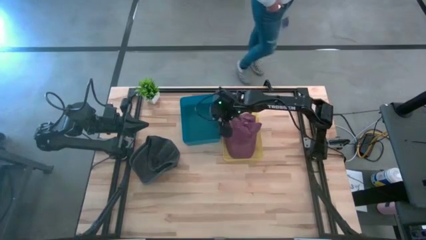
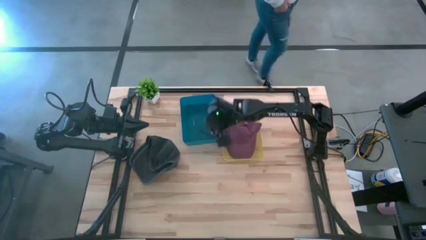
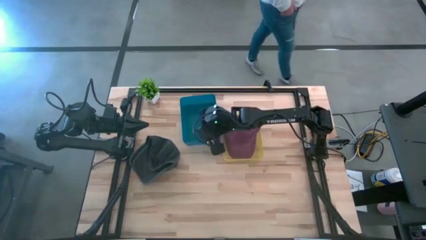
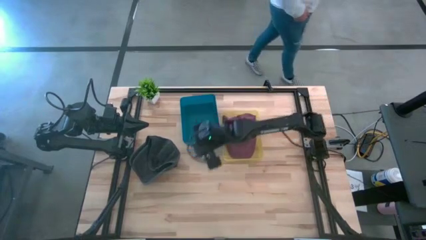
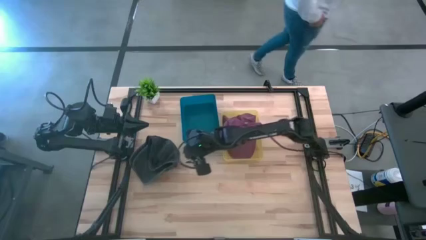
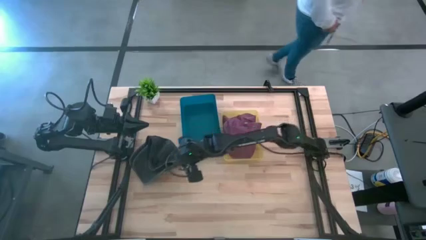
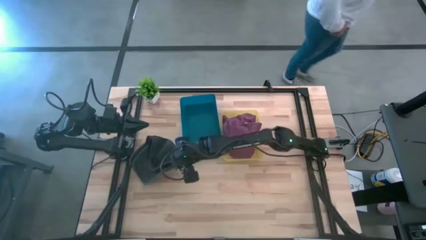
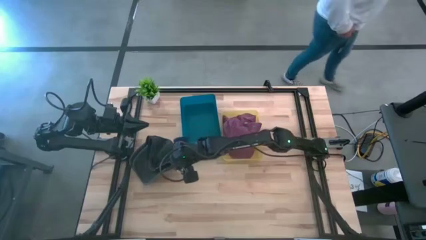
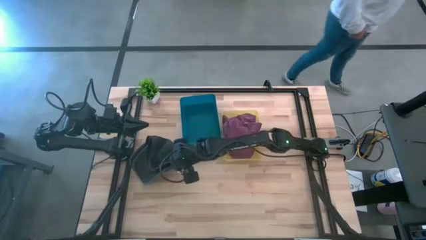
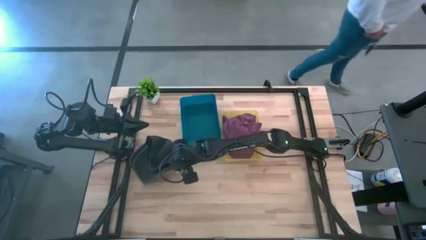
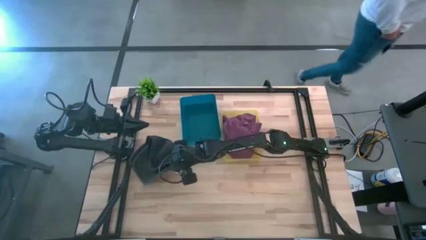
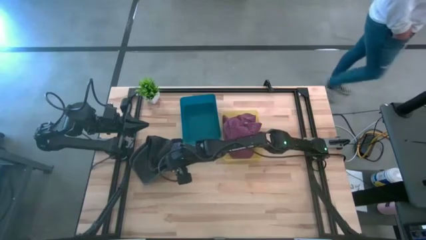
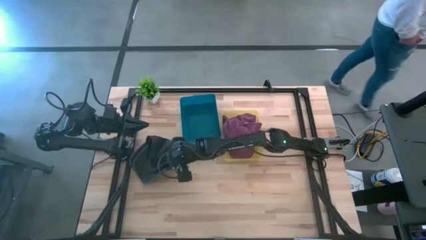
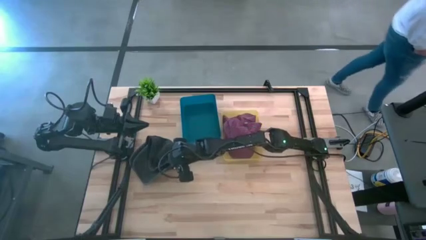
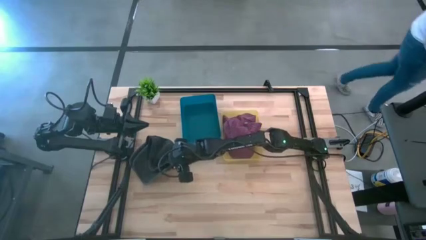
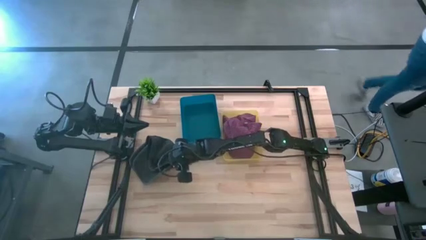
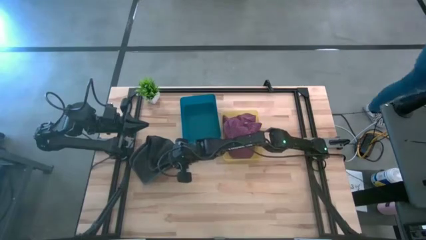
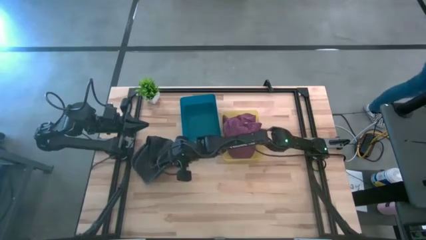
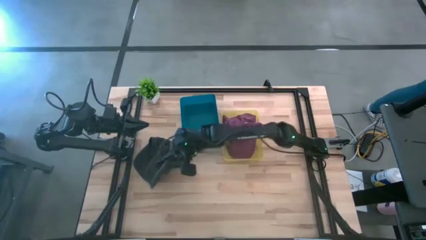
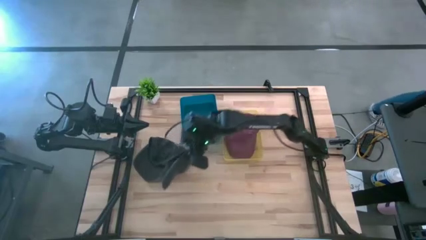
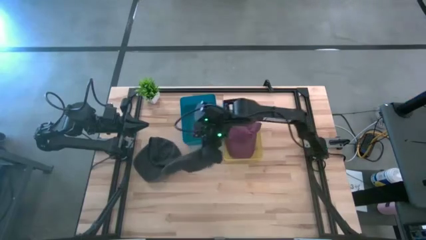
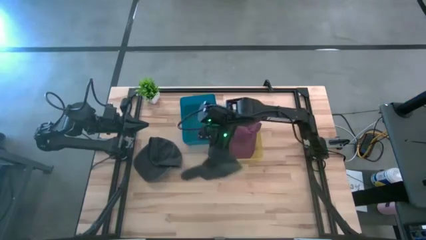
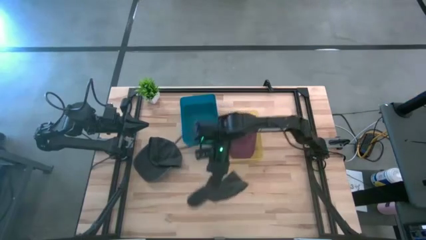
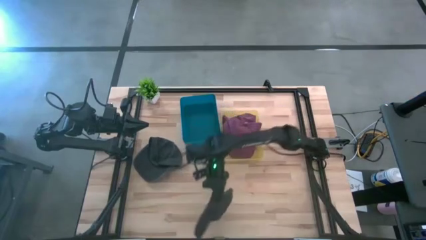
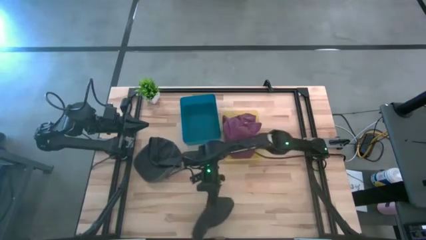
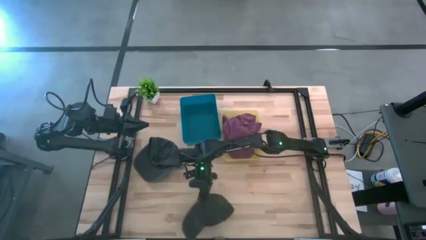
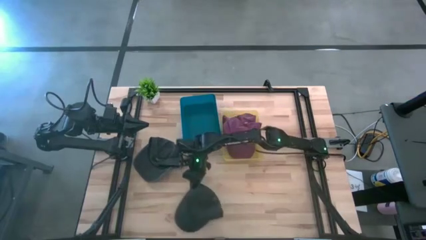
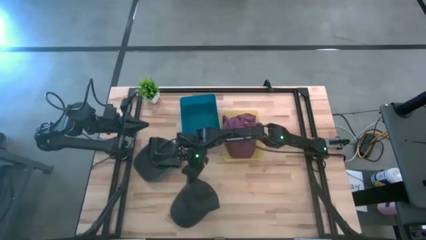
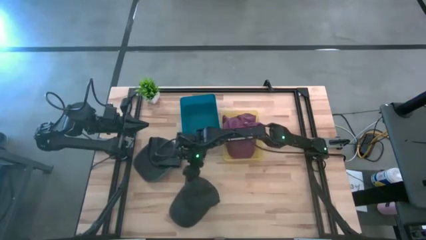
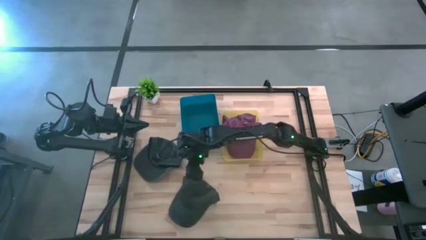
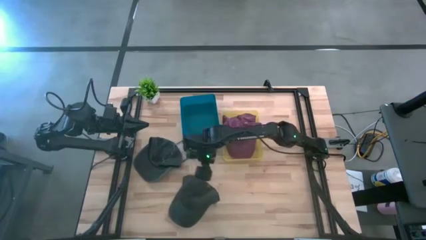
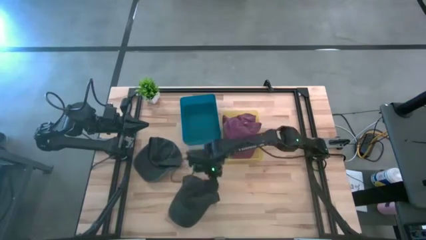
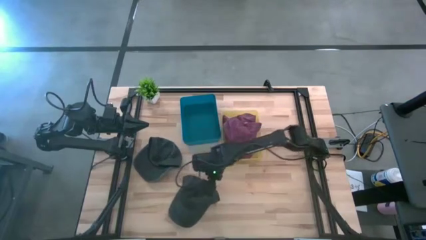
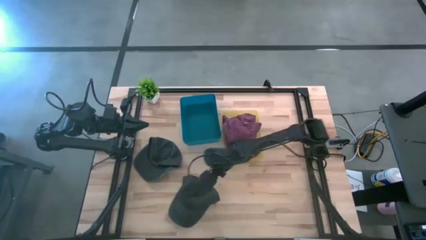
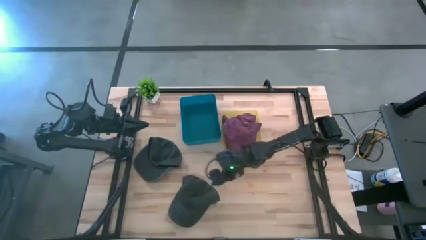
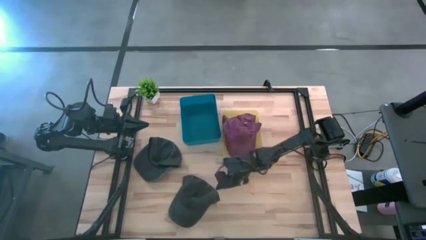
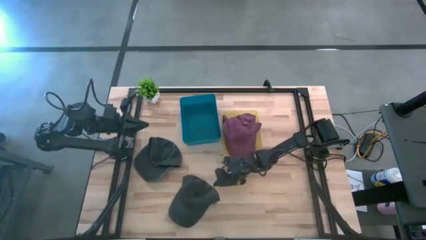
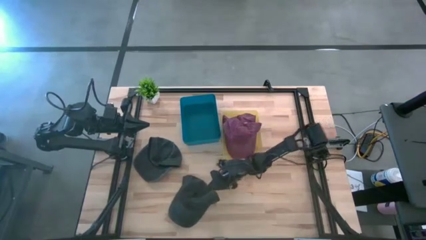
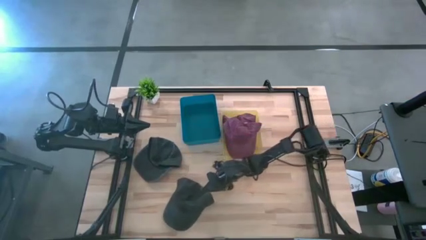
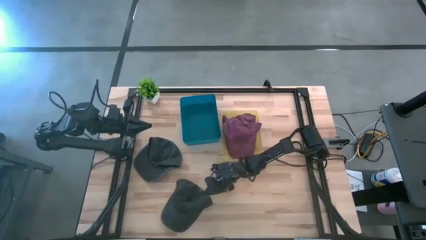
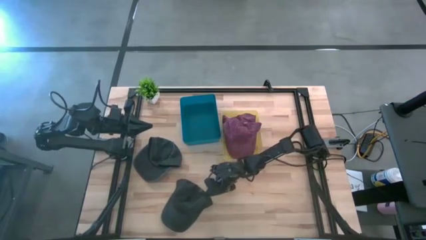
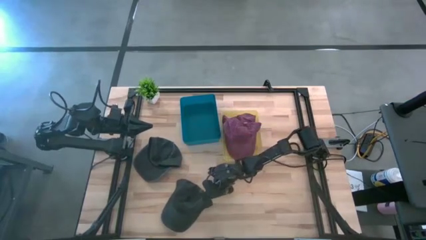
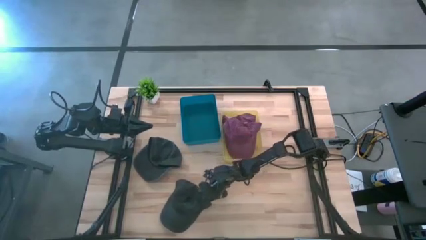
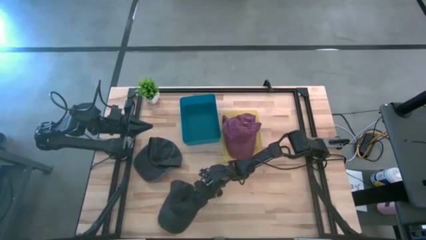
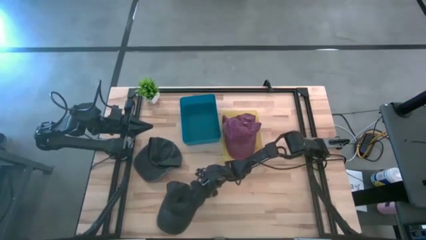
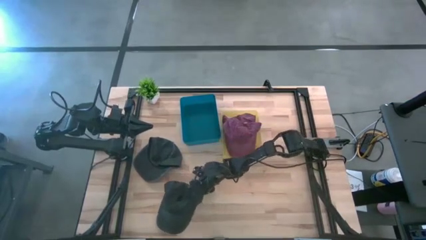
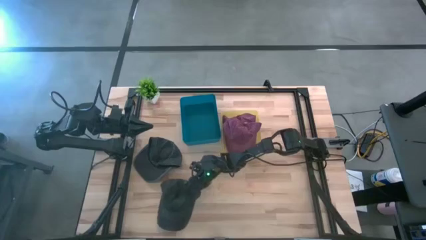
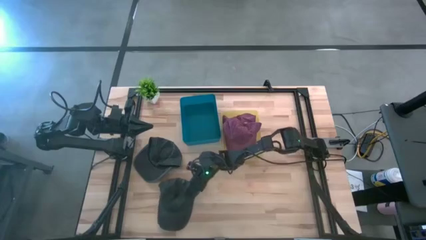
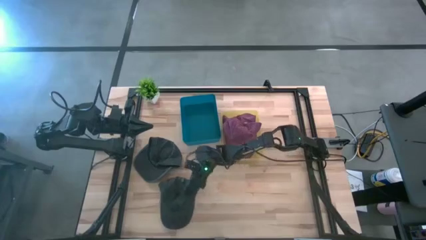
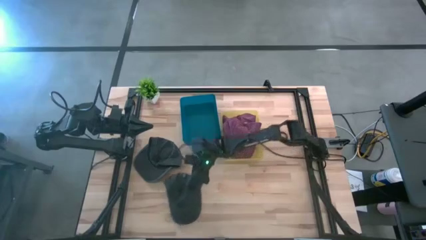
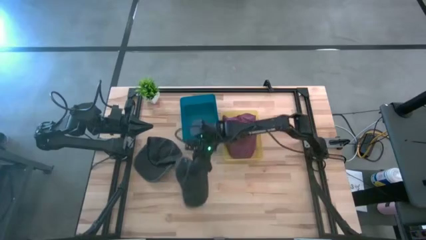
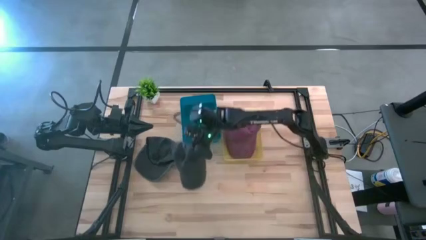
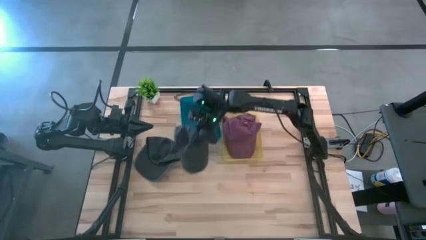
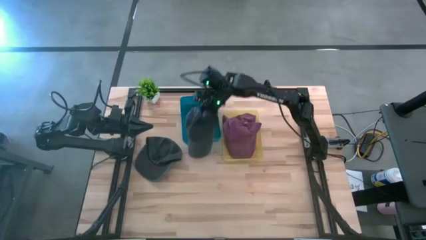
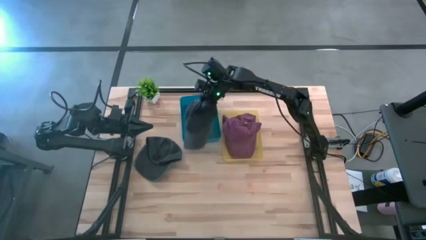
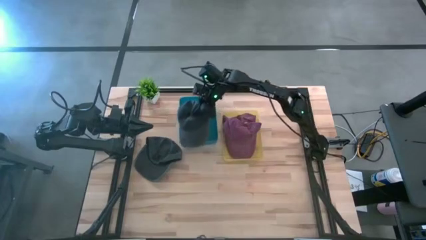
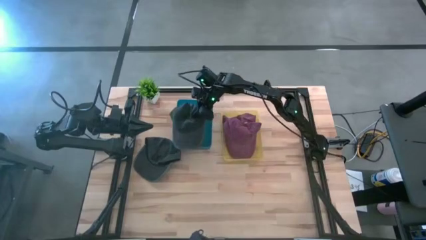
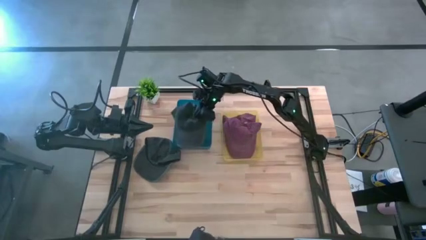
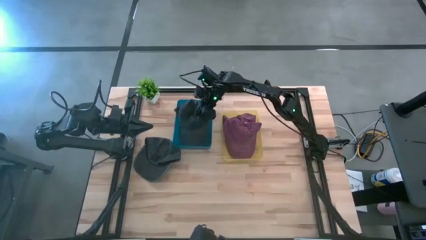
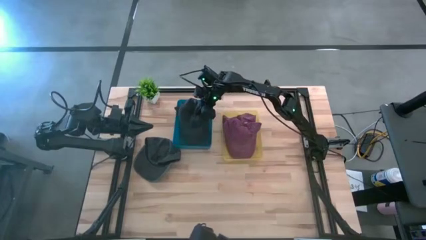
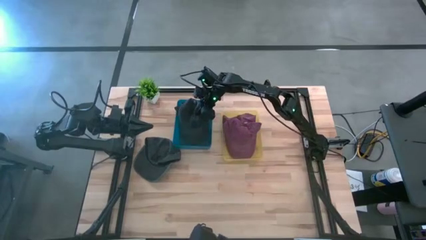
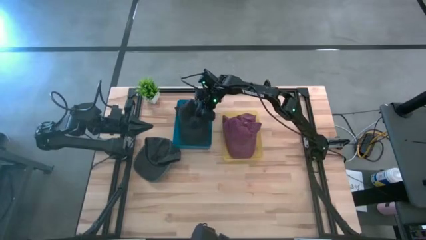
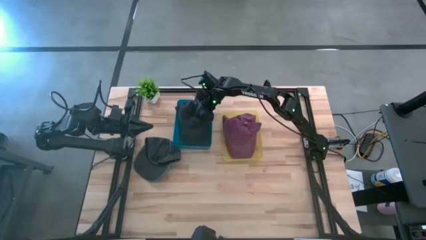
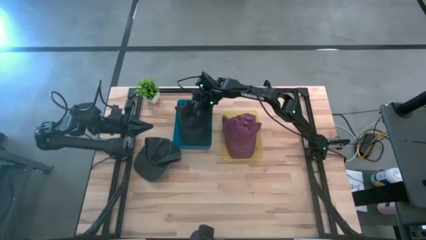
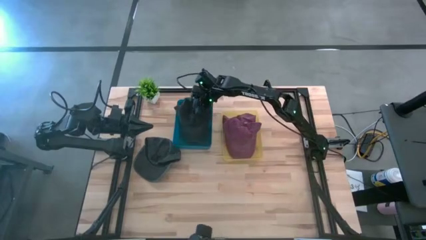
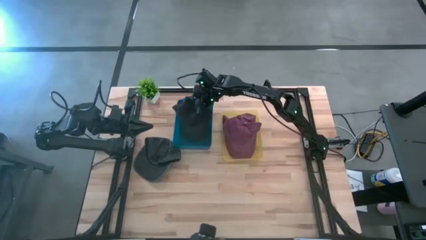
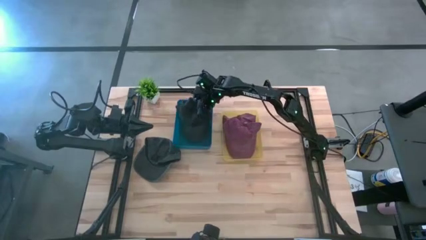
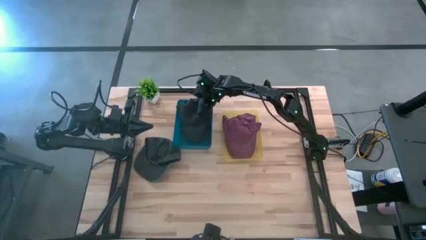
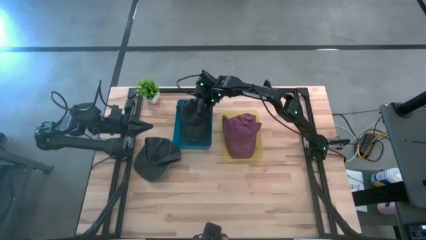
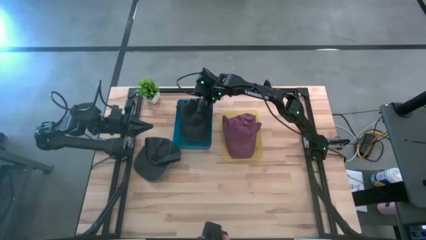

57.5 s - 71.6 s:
Task: Pick & Place hat
Put the top black cap into the blue bin
